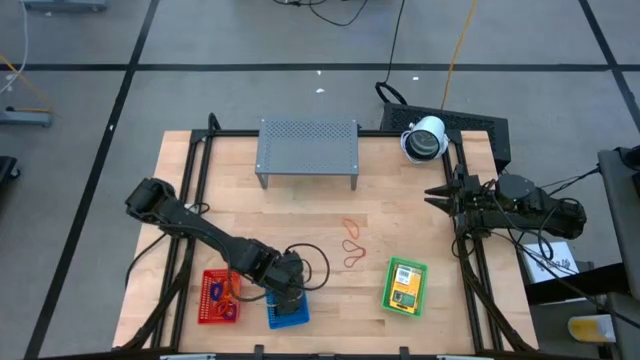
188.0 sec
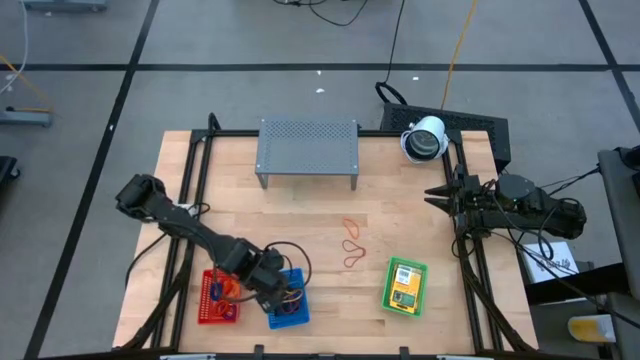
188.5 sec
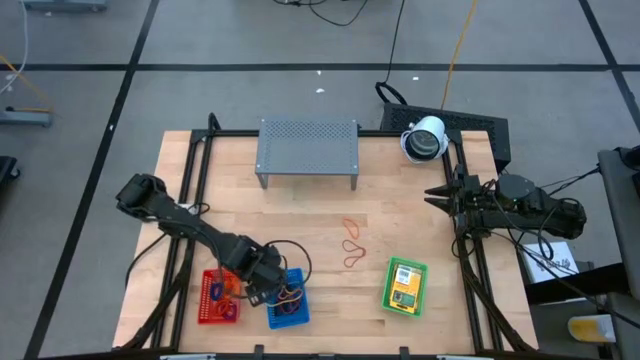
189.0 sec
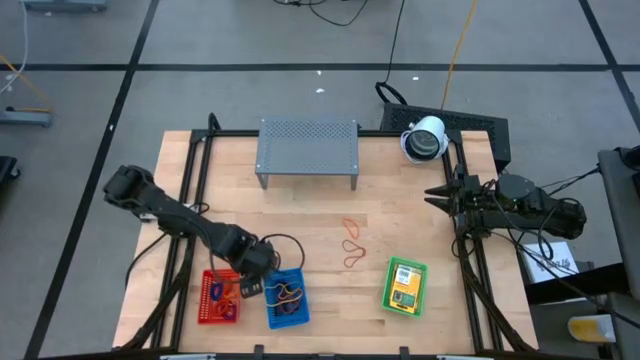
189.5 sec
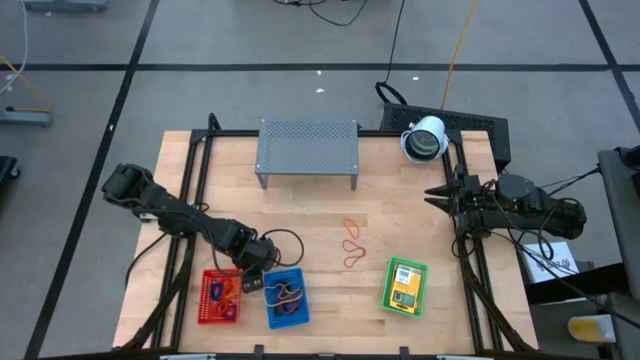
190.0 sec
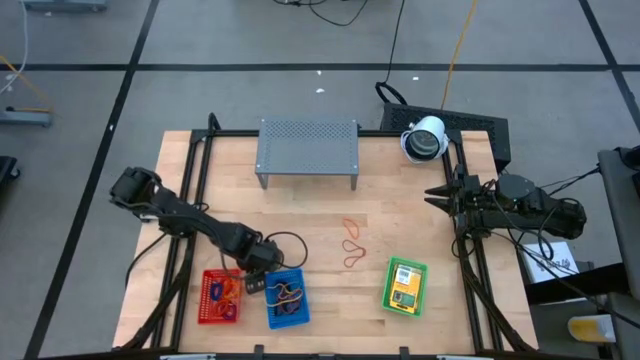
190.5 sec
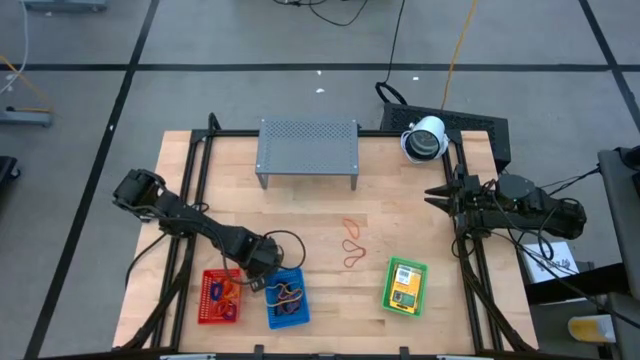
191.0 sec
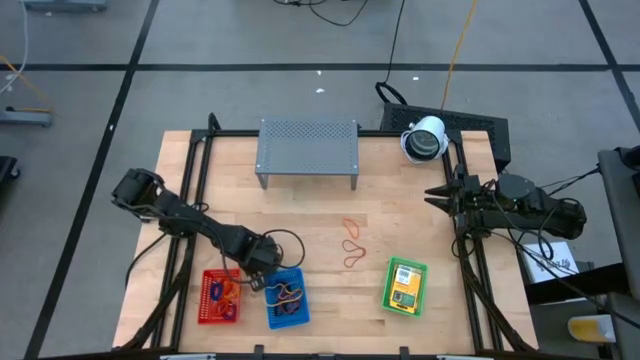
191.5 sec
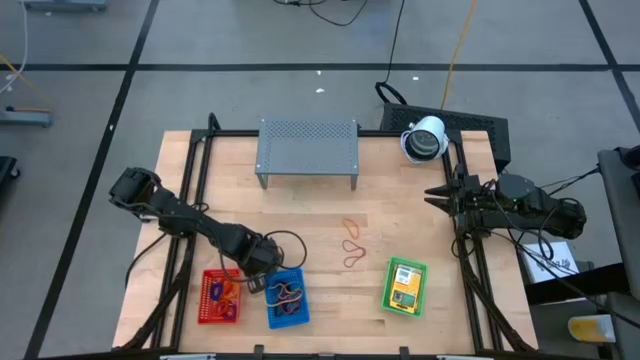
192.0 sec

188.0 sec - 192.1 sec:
Task: Pick & Place Office Desk Supplies
Put the orange rubber band into the blue bin

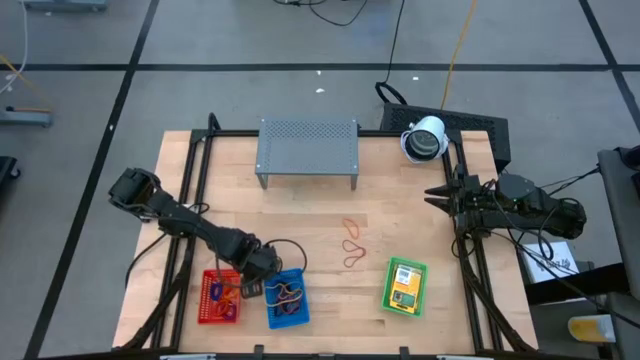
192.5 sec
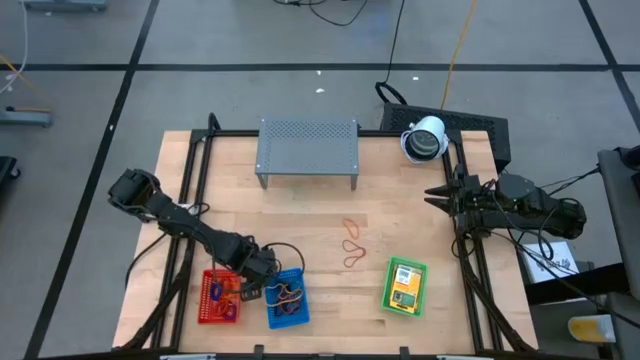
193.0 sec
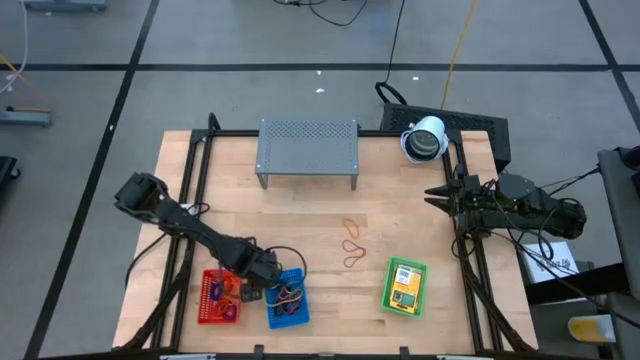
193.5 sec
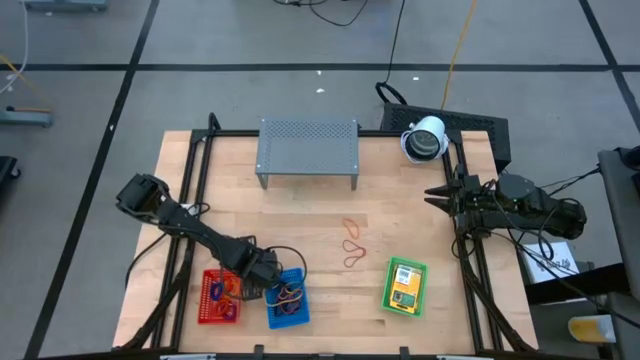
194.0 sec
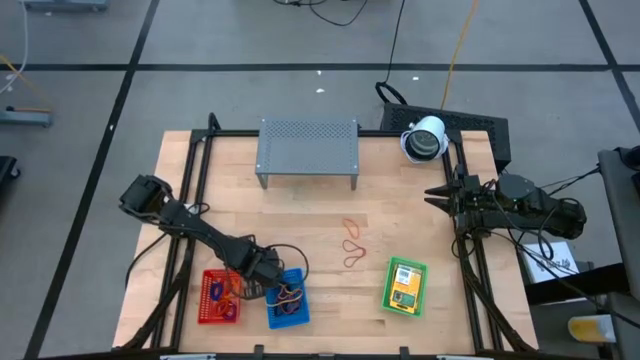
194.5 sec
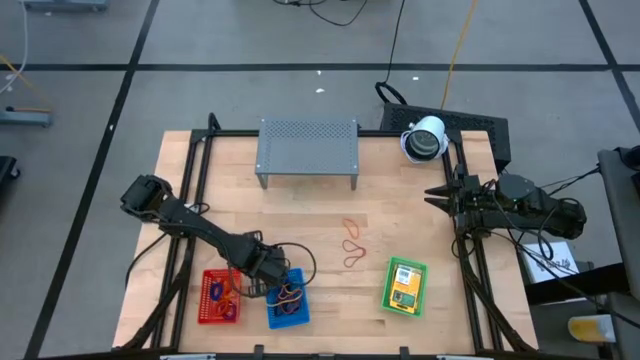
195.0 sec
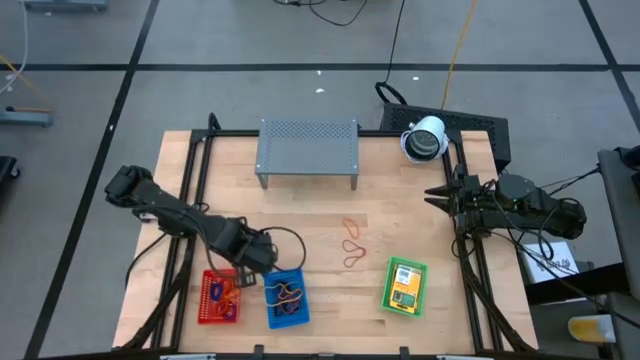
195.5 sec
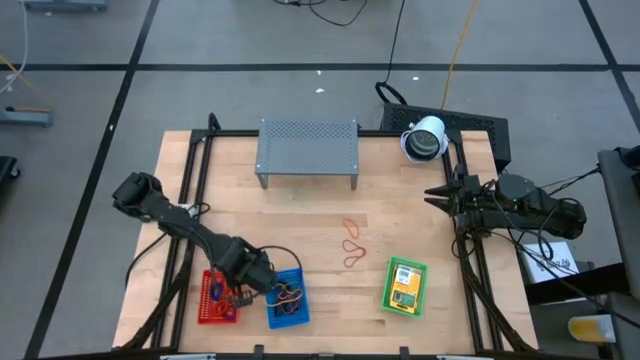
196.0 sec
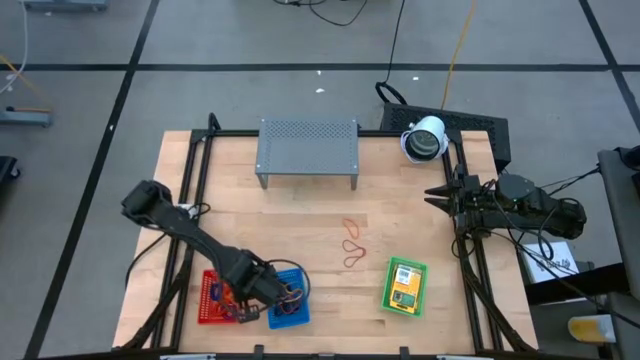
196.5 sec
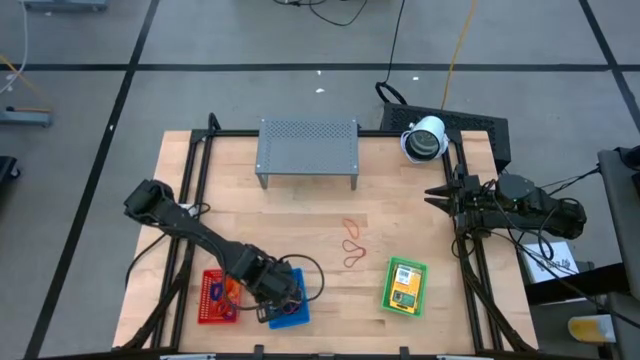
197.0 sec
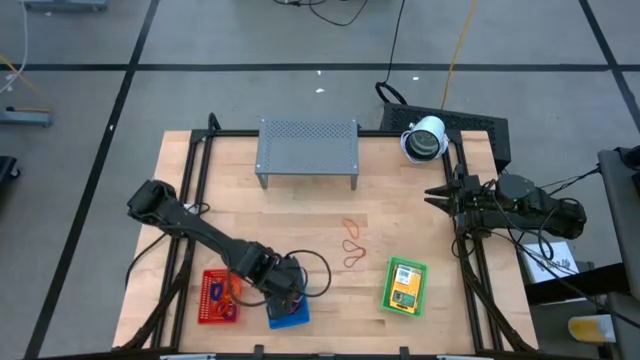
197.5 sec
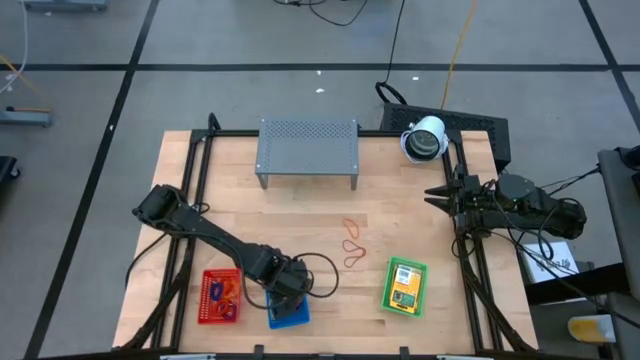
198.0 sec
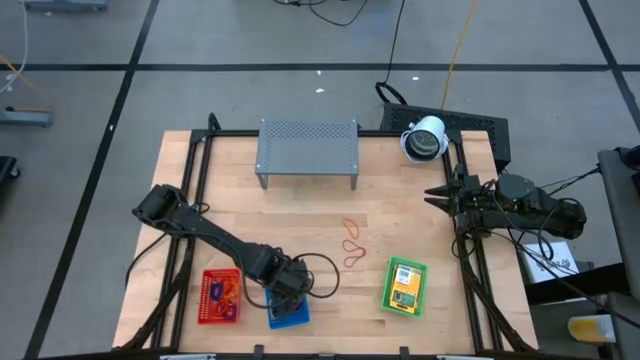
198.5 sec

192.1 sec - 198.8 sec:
Put the orange rubber band into the blue bin

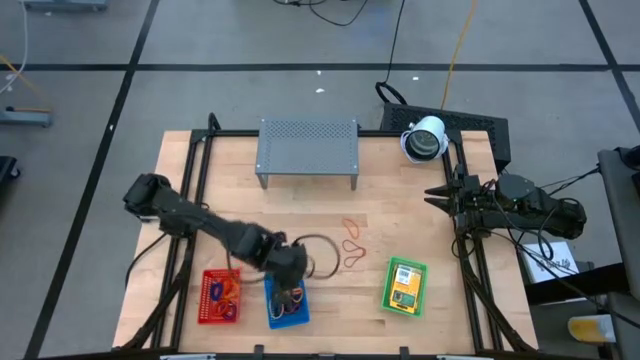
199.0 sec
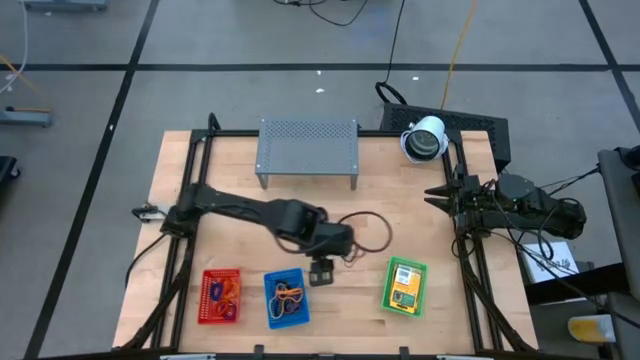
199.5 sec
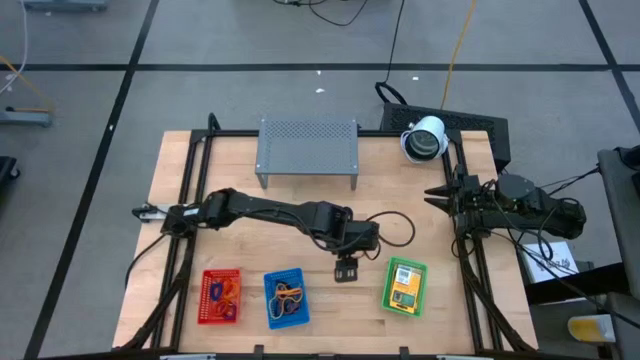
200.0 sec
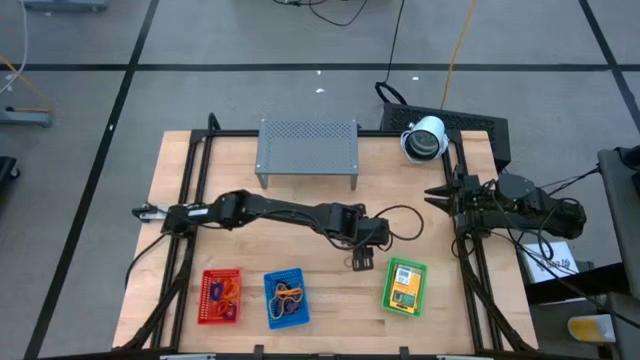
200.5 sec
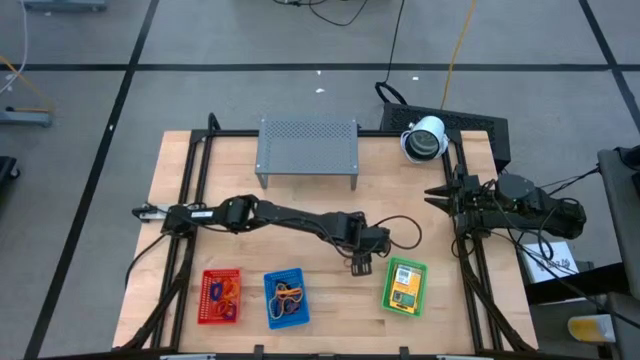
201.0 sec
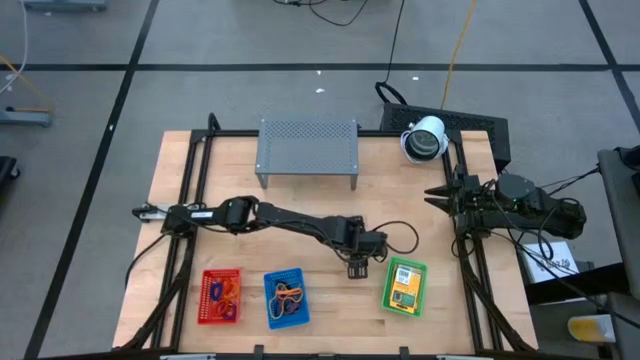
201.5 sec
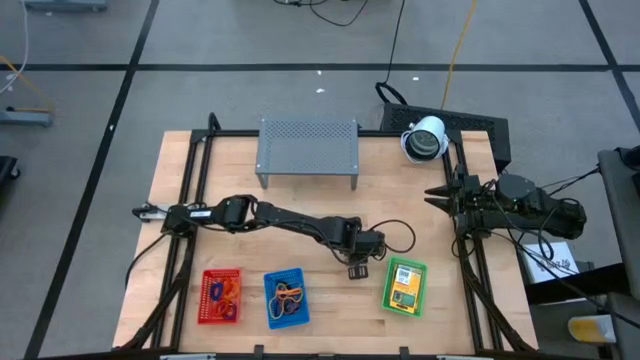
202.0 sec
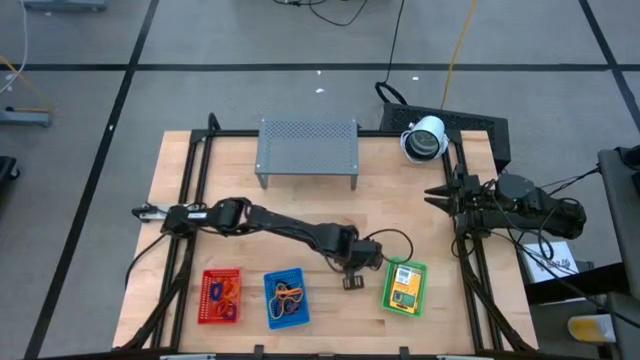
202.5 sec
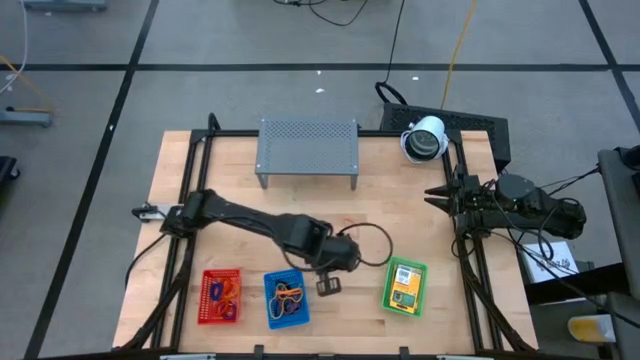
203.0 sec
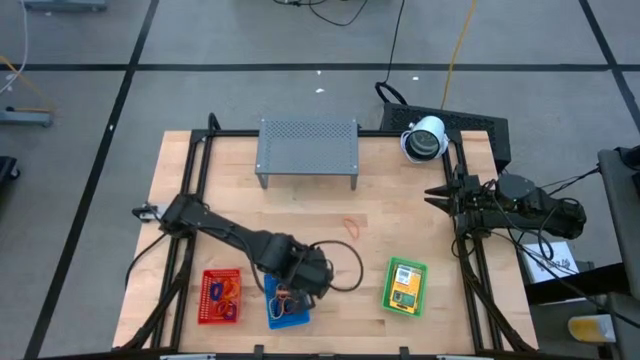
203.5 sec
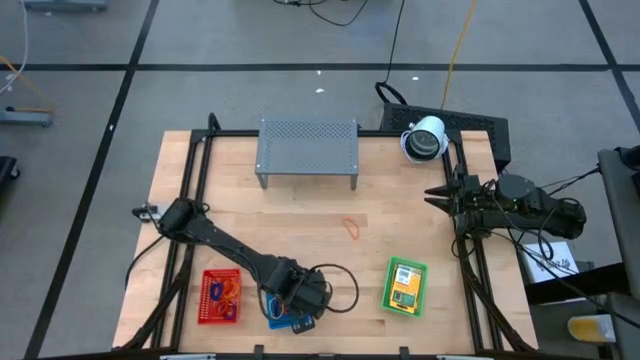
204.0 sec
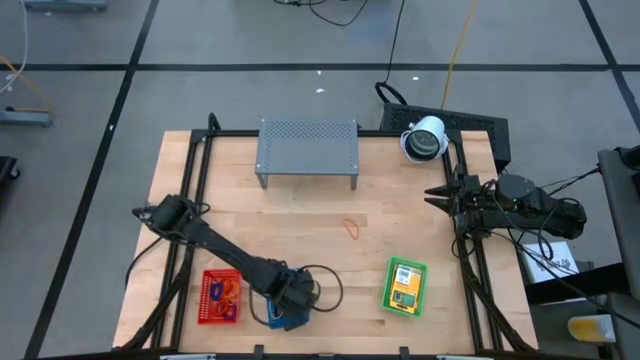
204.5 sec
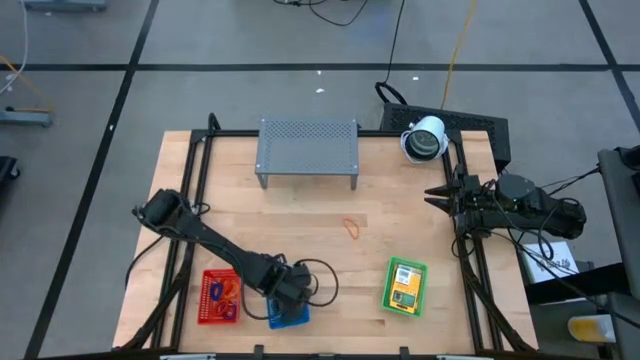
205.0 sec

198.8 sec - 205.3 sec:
Put the red rubber band into the blue bin

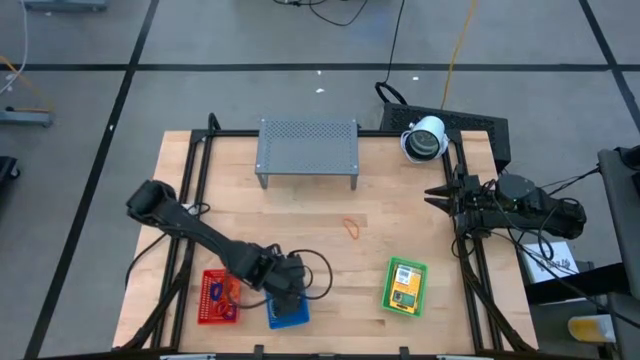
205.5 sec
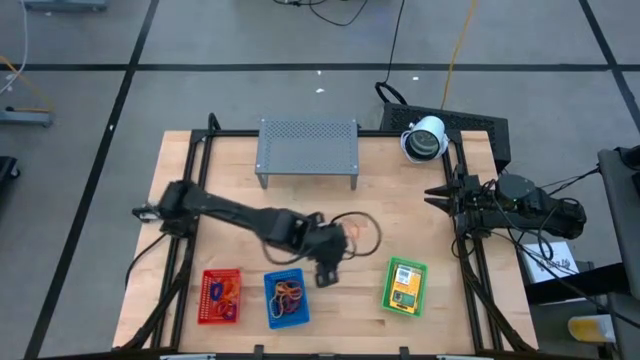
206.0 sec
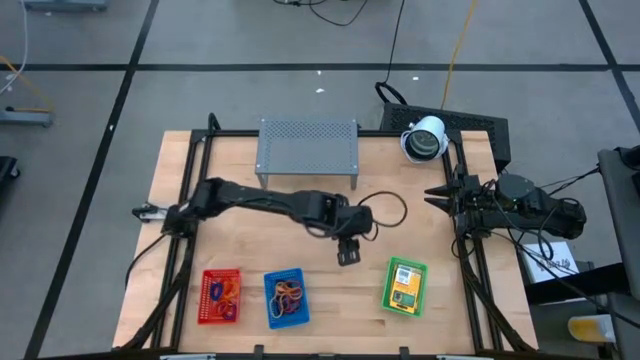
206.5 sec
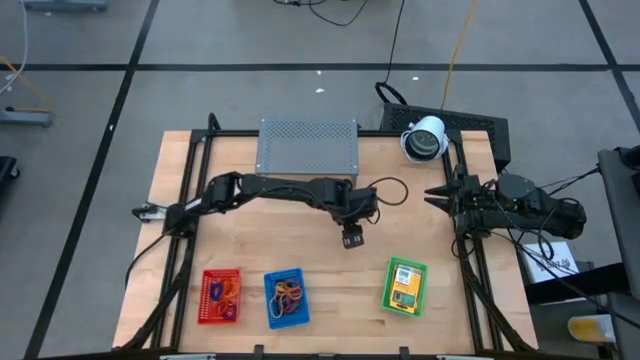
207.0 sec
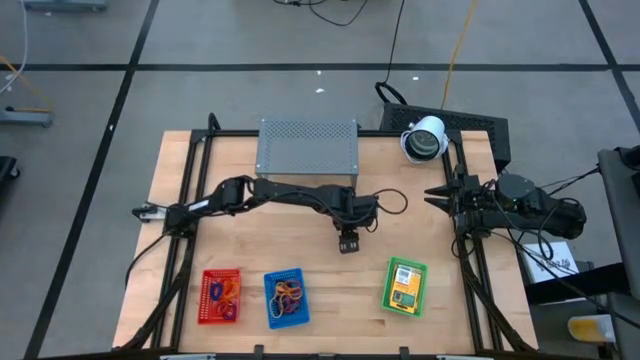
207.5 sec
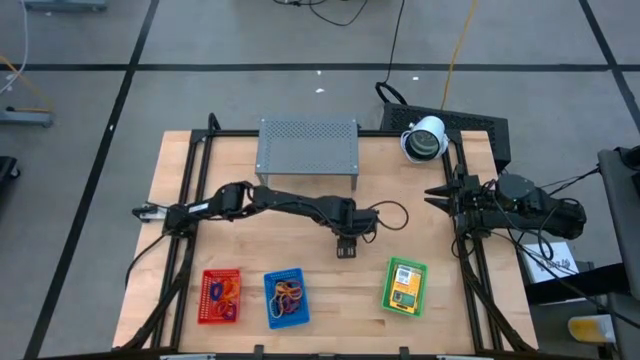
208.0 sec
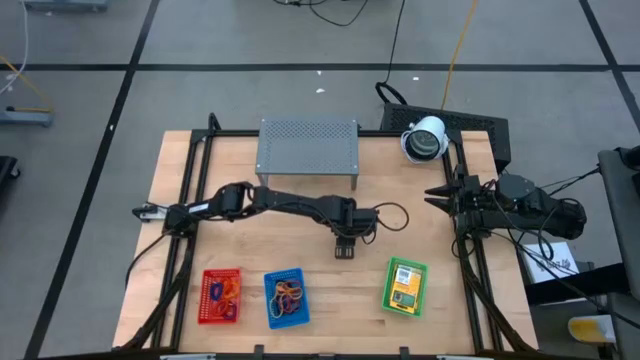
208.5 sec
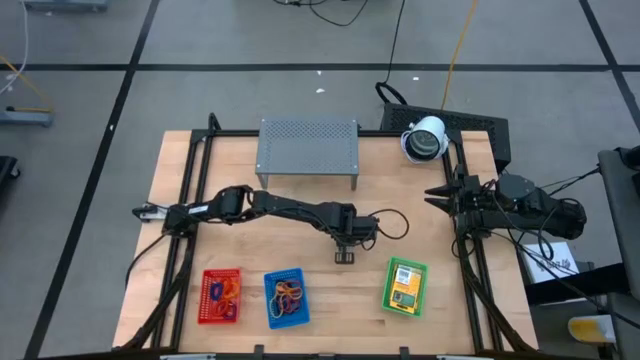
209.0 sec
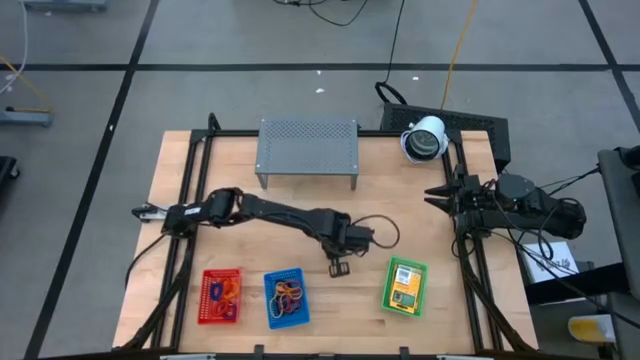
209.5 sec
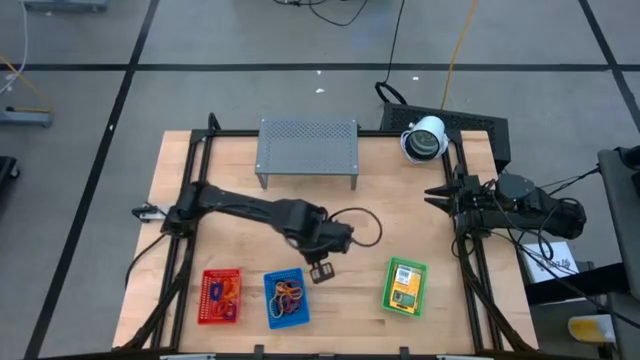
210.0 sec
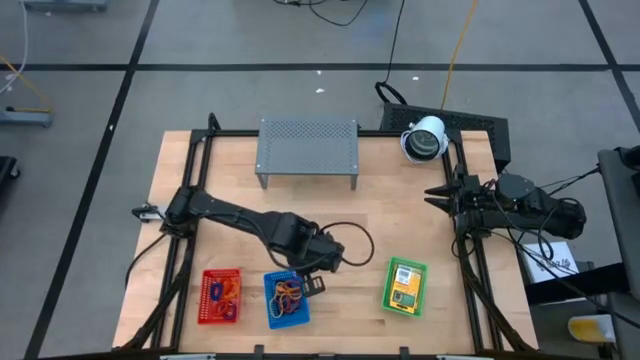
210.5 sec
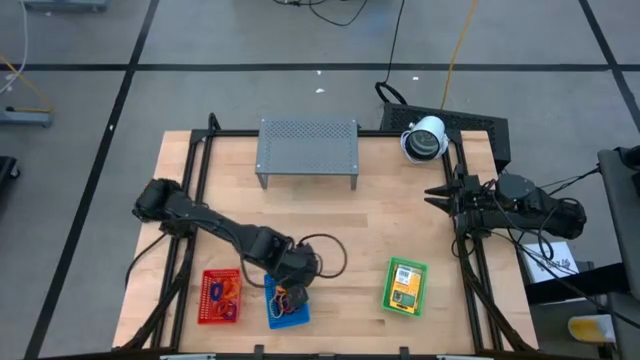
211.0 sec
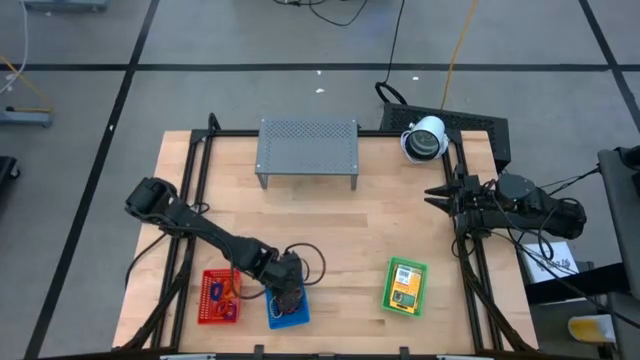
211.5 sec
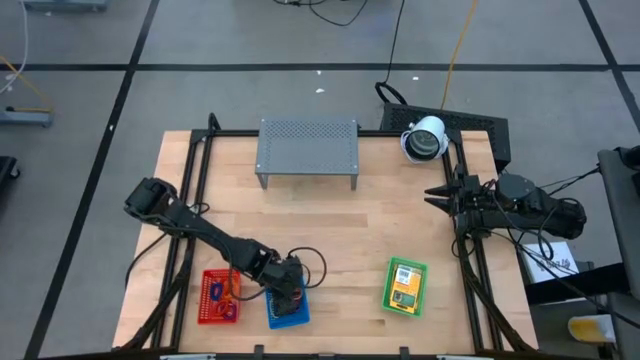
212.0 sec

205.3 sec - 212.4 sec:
Put the orange rubber band into the blue bin
